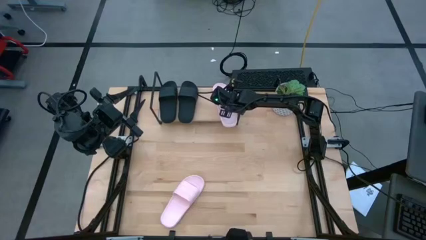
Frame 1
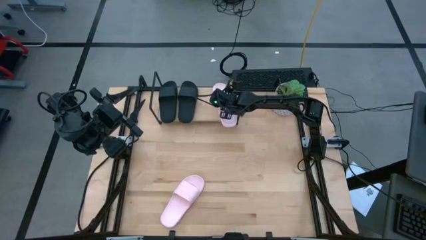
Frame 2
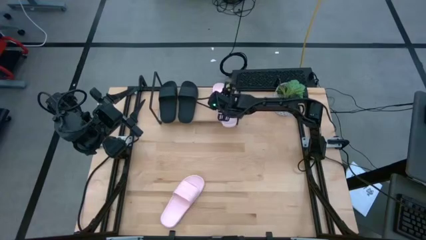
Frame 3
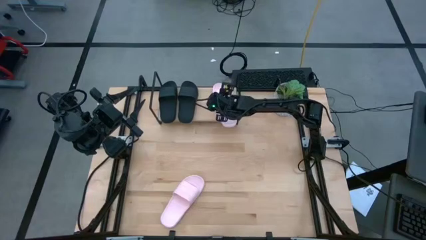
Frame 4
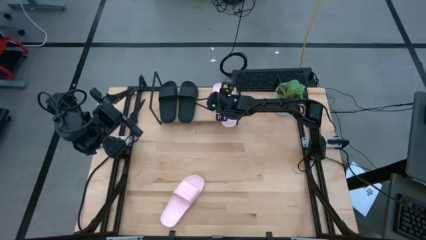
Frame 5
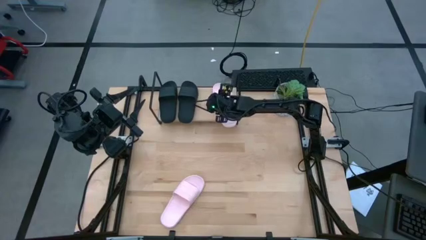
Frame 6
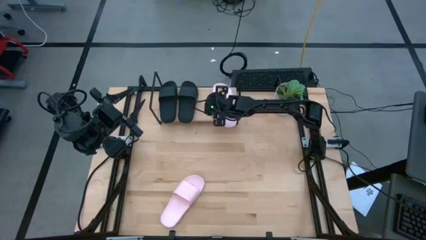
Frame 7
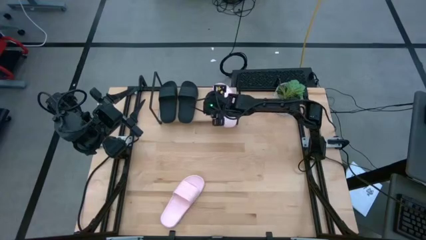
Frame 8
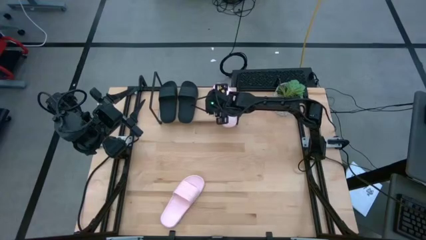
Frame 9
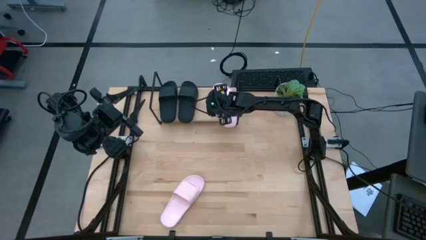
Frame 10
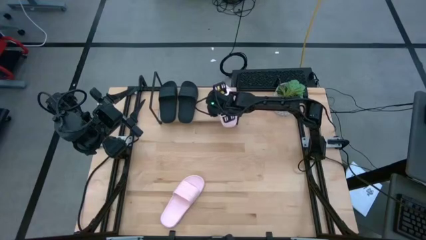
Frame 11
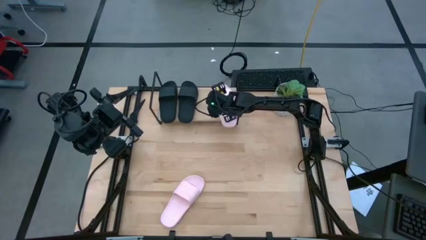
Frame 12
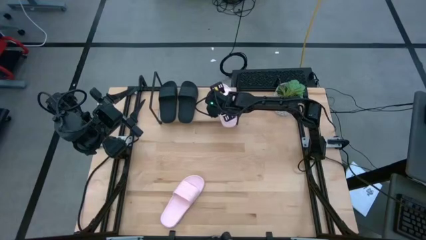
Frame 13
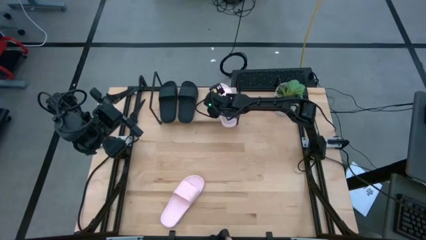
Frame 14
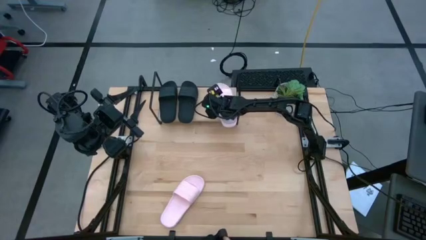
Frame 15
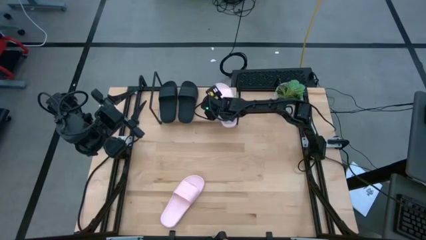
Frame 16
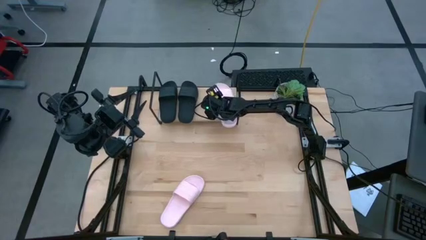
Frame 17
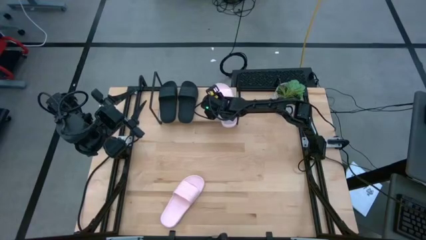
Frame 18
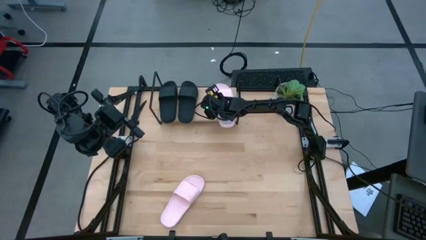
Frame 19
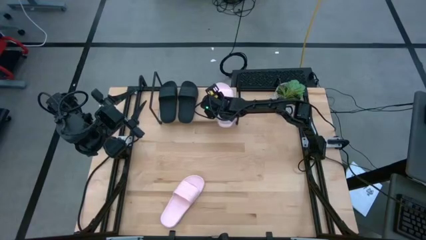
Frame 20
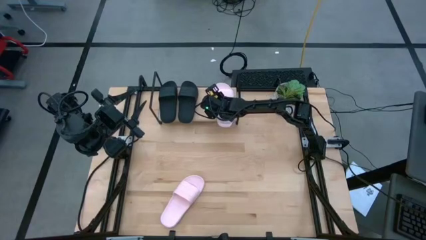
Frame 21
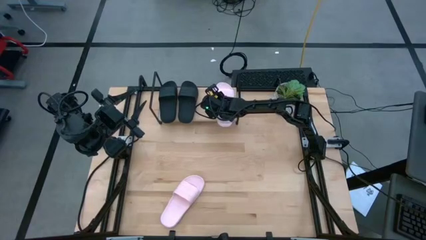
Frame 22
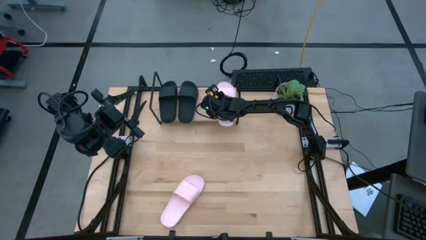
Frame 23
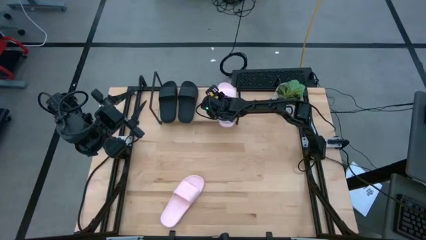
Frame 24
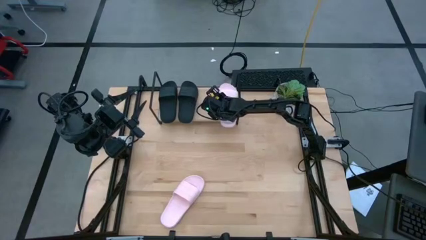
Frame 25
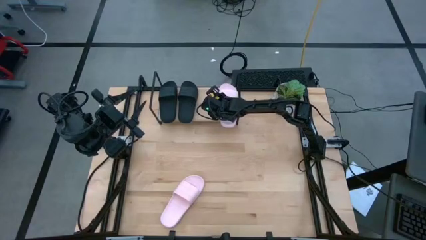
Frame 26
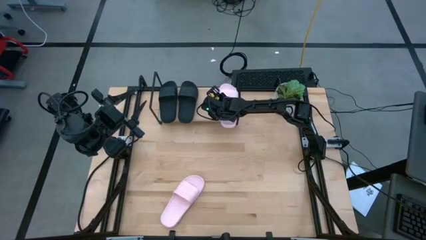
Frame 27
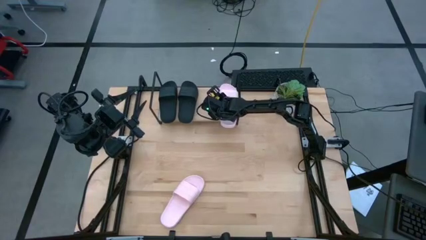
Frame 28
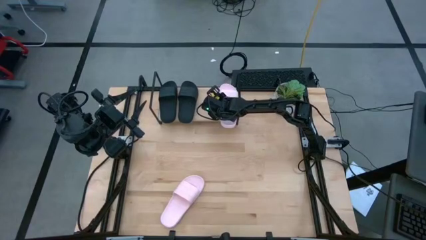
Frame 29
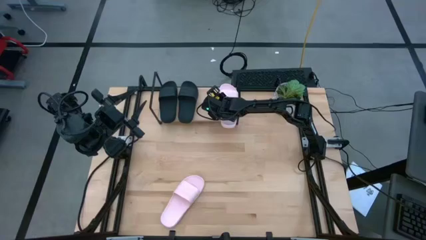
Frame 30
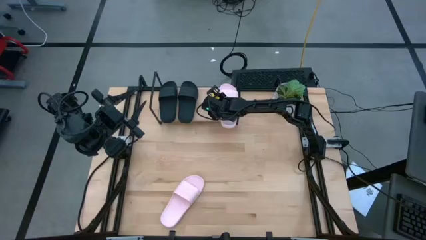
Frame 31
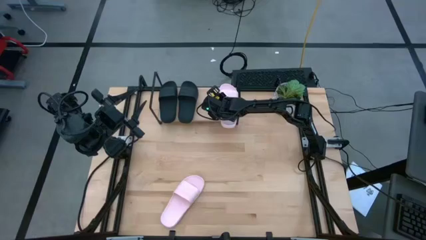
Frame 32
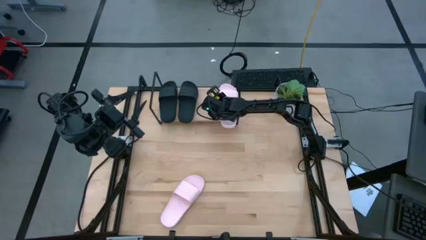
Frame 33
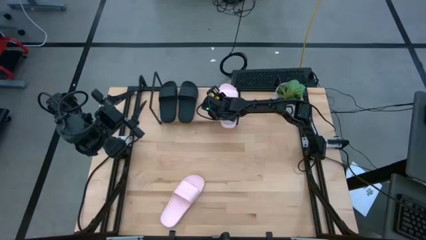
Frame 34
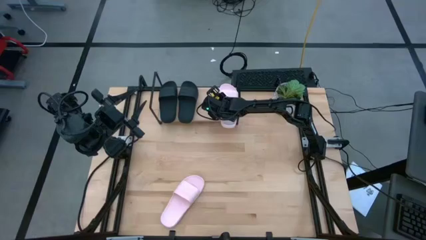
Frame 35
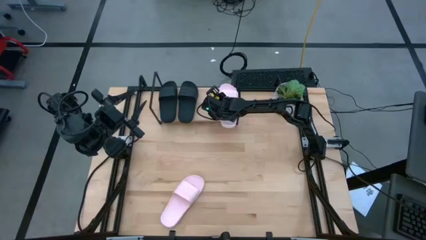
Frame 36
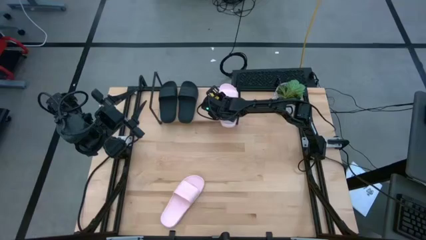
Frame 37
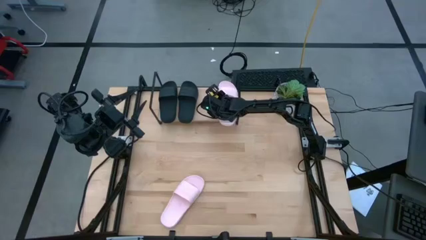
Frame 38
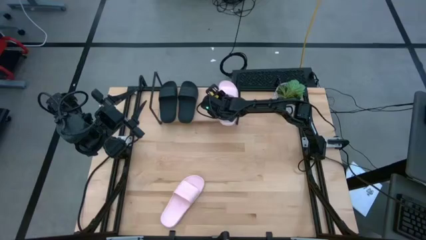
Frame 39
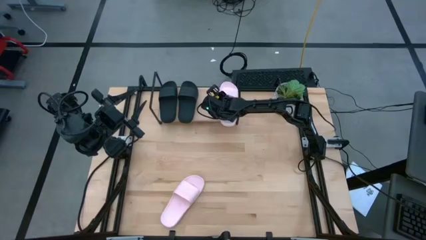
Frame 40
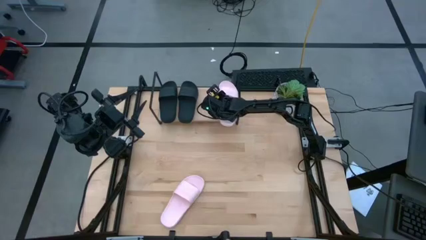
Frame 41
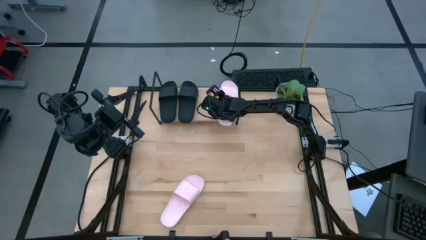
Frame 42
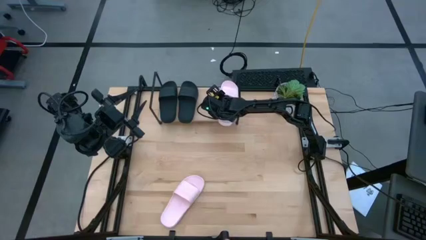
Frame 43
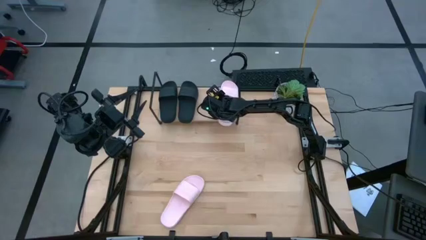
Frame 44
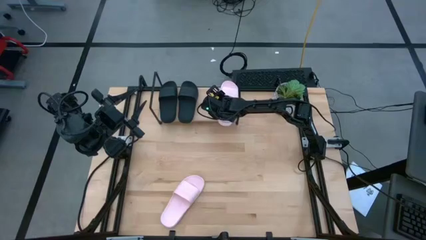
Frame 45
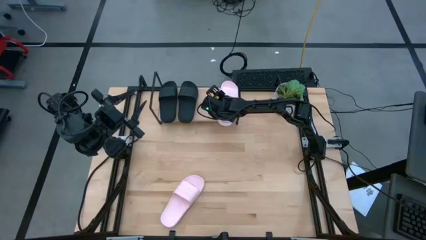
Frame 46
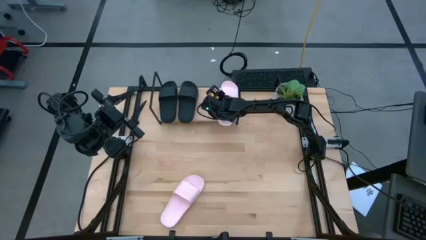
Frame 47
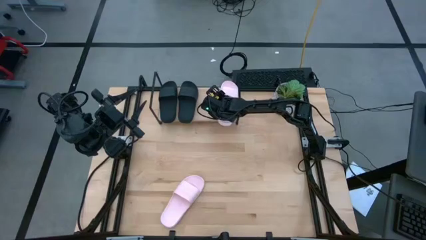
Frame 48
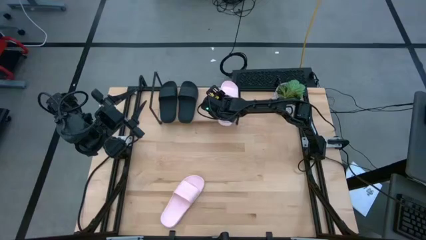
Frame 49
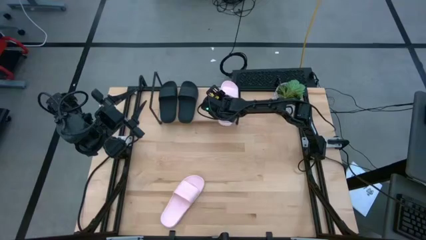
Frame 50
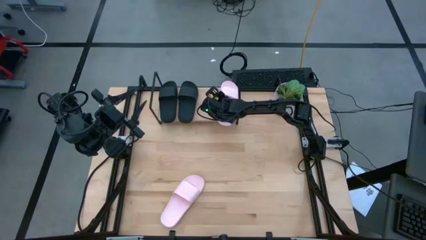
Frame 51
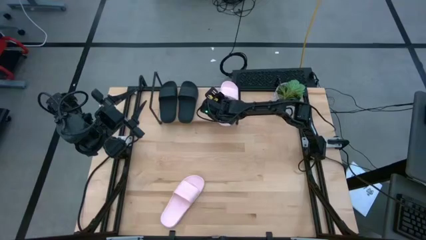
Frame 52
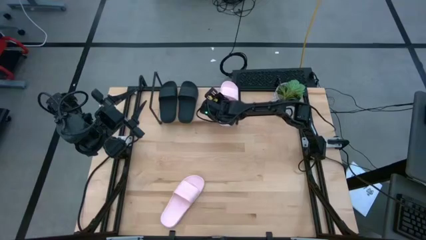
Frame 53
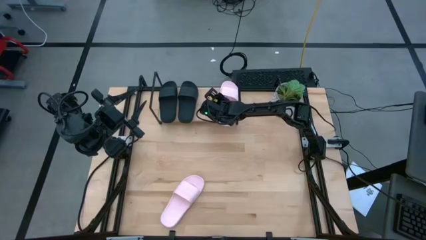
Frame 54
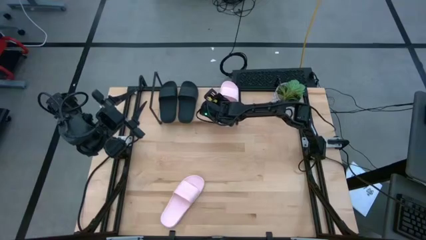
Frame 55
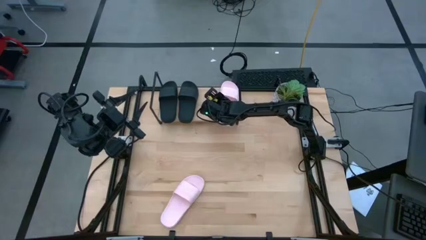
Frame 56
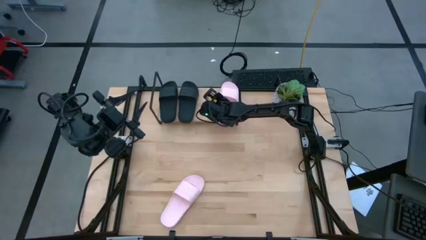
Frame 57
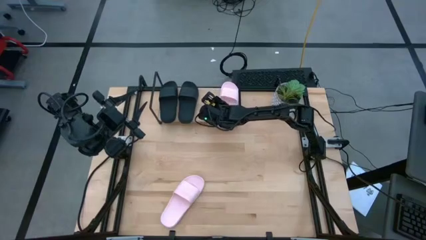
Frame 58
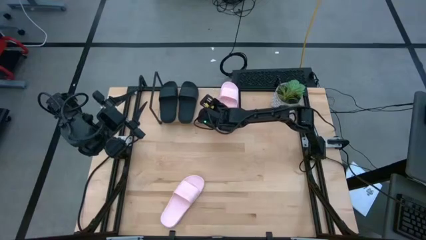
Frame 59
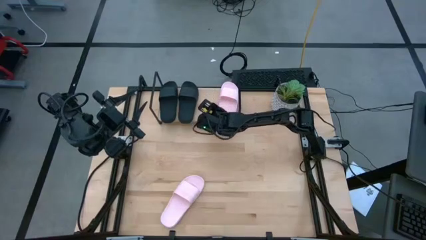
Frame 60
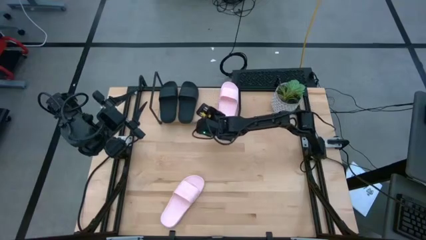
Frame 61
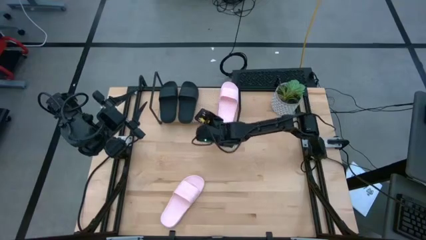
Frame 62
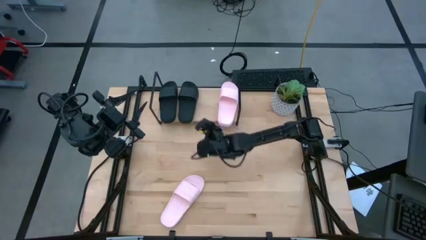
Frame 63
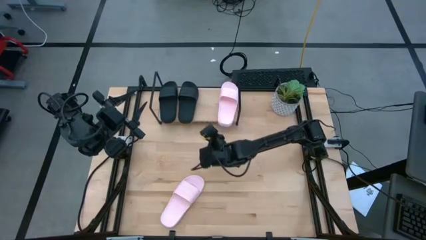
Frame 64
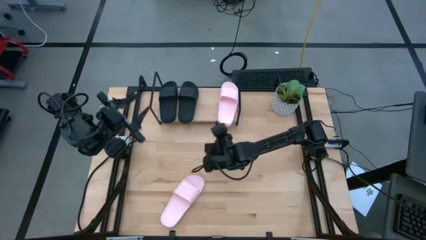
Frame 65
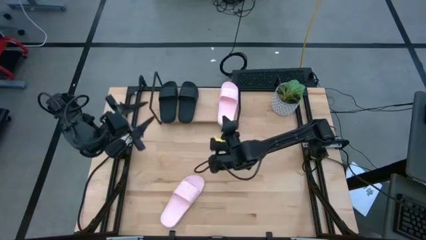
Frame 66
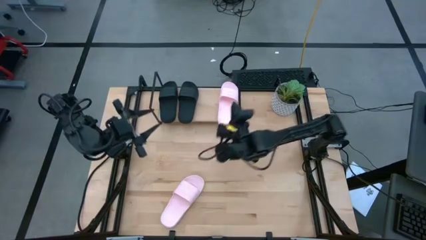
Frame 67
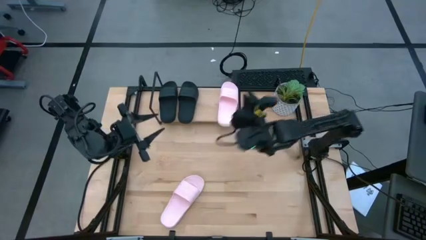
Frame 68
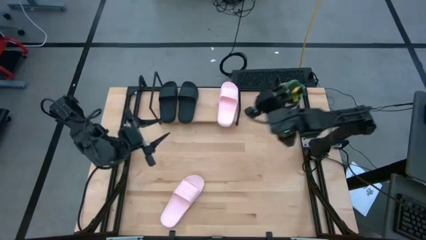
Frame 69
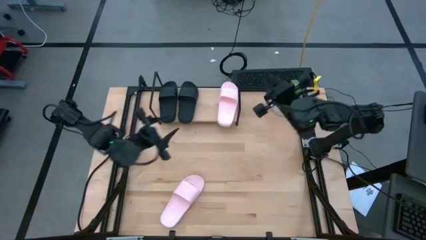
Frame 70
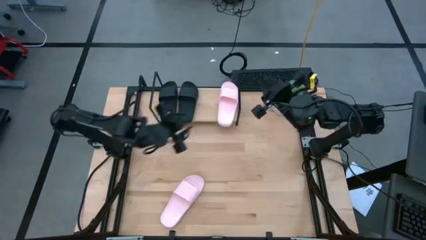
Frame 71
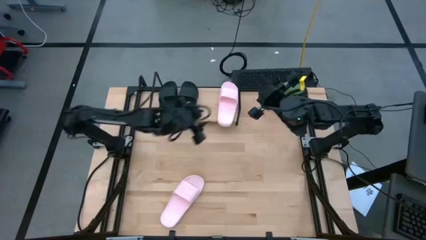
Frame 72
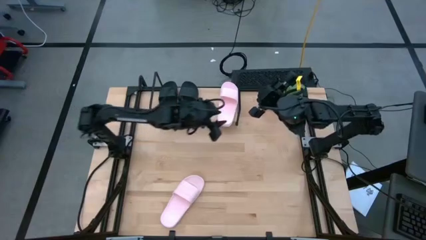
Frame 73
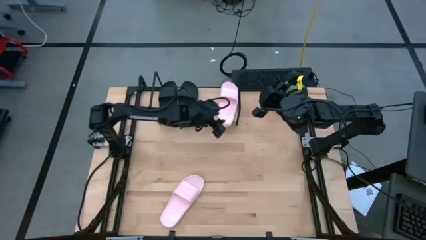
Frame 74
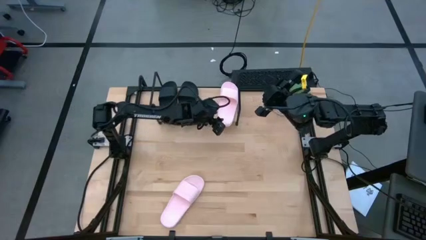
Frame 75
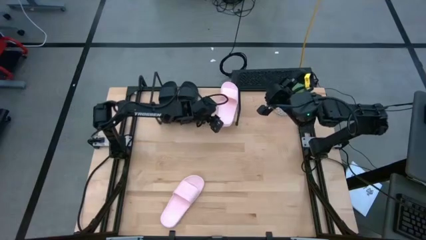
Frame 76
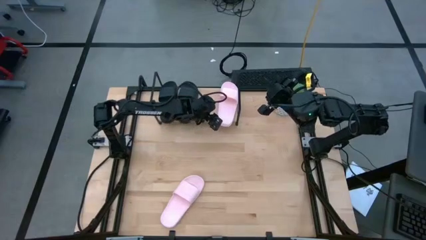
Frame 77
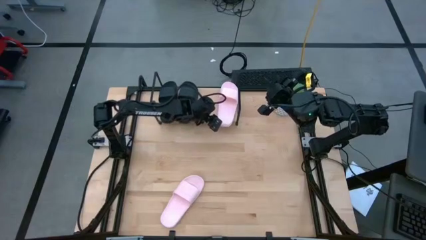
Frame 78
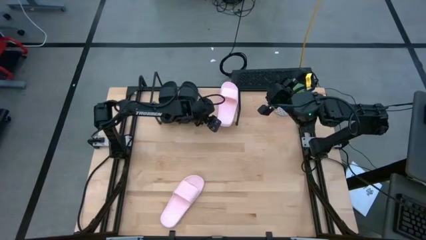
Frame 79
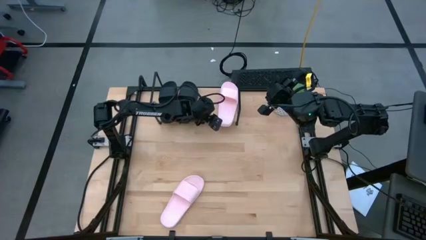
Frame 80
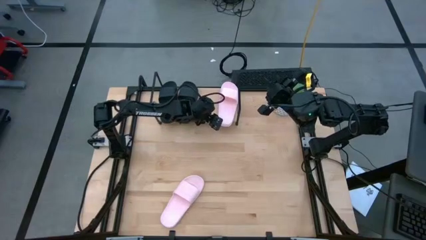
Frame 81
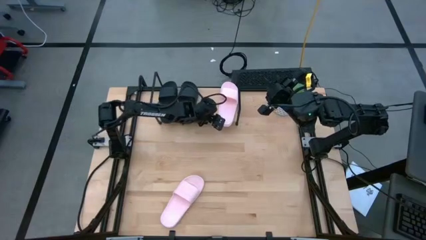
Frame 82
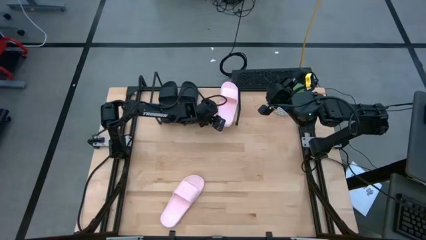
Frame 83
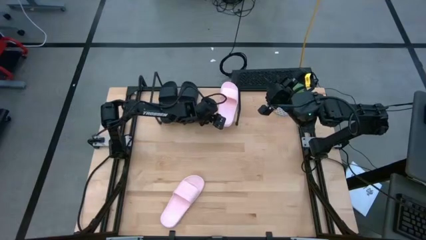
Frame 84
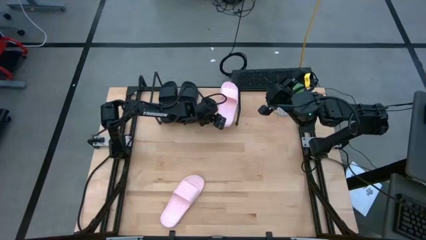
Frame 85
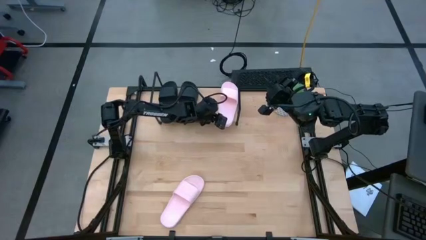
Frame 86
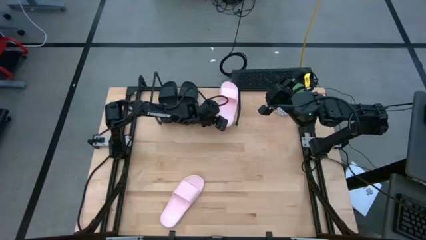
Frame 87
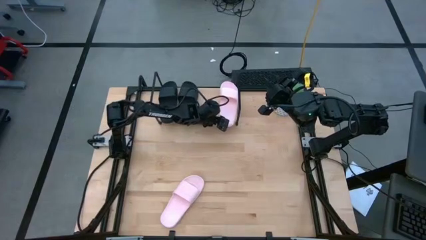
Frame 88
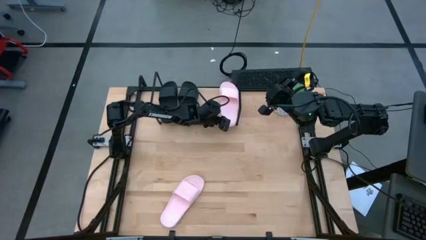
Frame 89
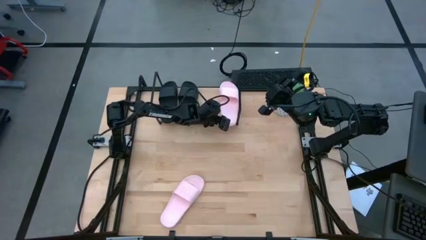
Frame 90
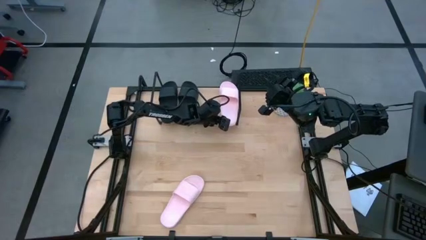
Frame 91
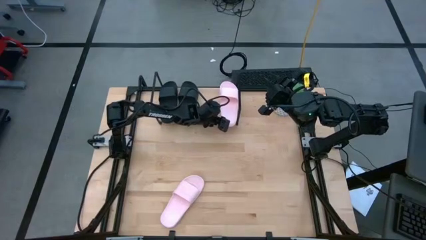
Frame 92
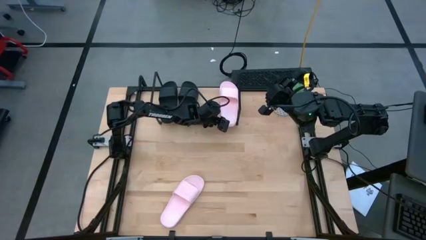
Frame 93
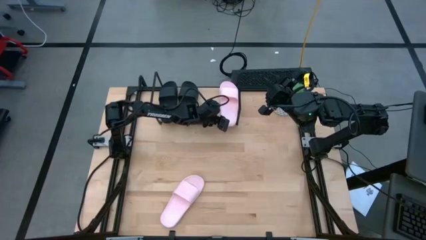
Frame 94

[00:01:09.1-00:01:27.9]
Task: Pick and place slides into the shelf
Adjust the pink slipper on the shelf
